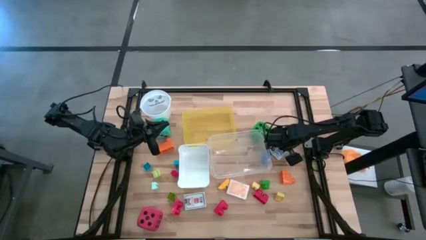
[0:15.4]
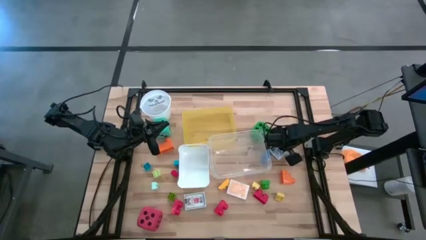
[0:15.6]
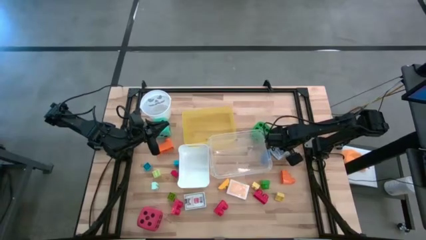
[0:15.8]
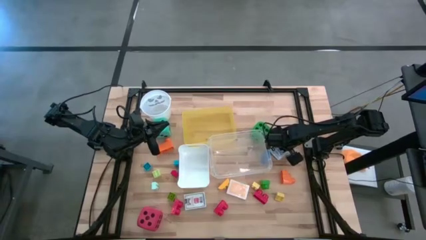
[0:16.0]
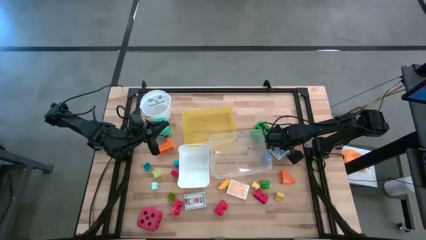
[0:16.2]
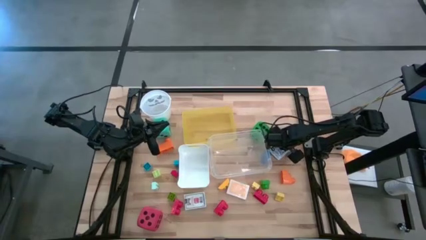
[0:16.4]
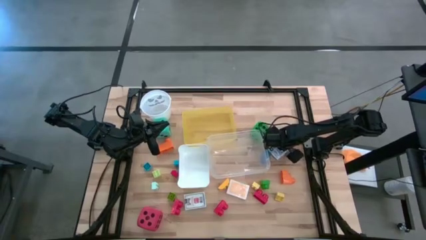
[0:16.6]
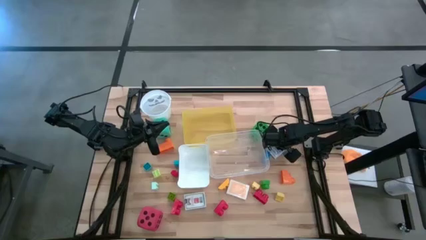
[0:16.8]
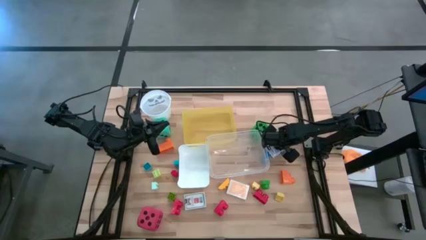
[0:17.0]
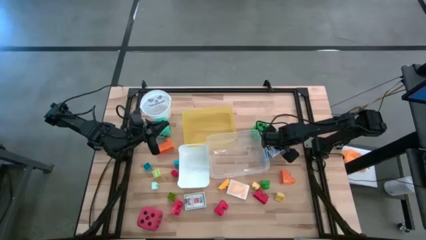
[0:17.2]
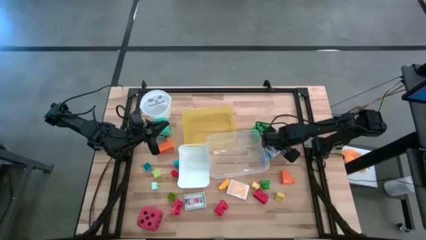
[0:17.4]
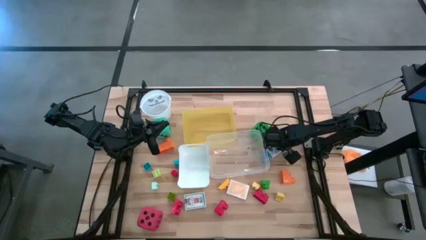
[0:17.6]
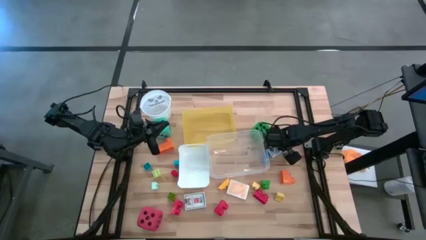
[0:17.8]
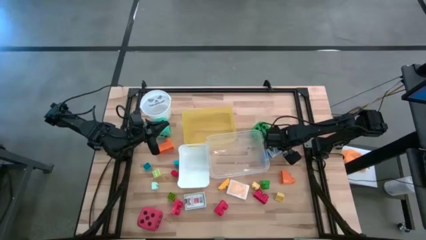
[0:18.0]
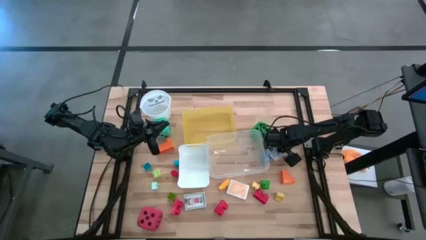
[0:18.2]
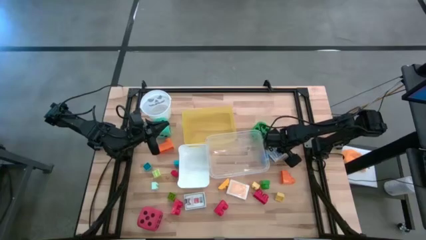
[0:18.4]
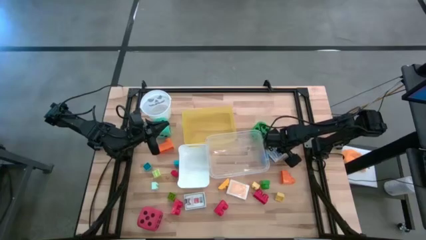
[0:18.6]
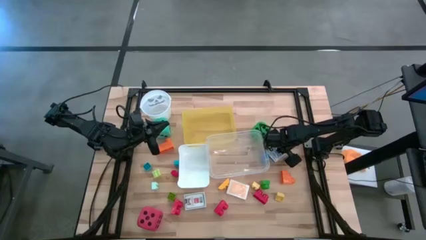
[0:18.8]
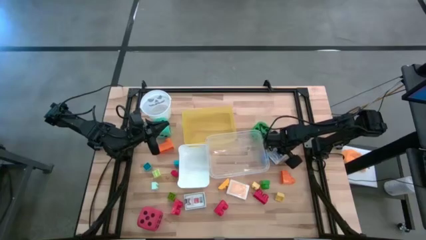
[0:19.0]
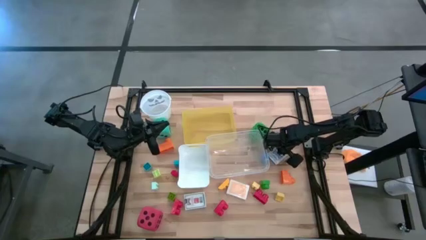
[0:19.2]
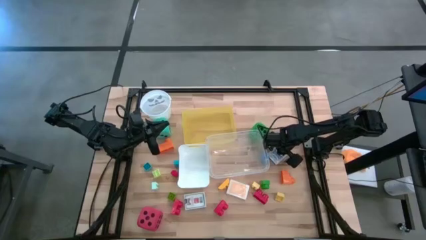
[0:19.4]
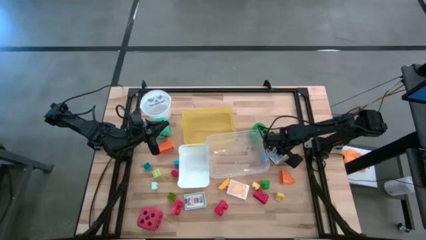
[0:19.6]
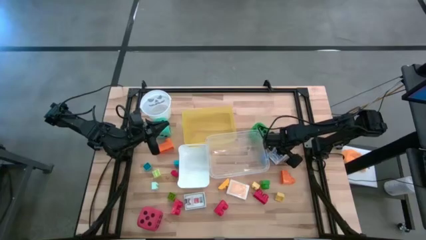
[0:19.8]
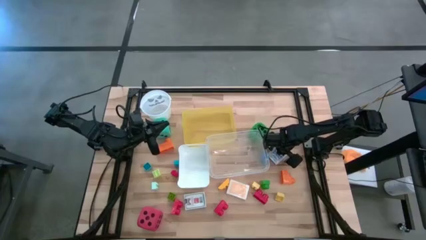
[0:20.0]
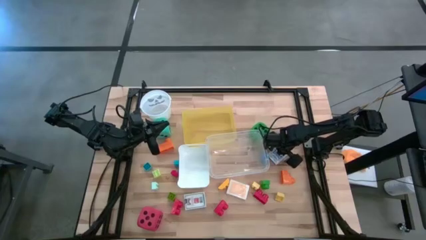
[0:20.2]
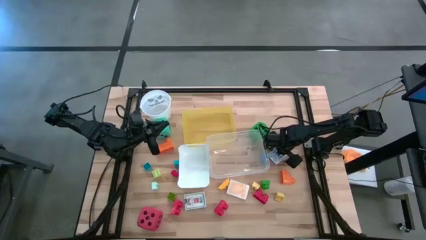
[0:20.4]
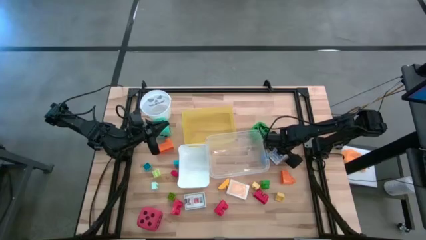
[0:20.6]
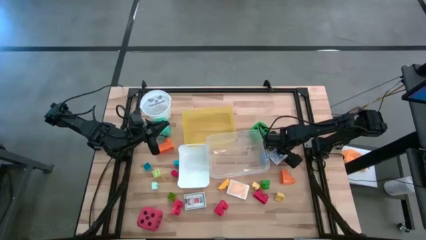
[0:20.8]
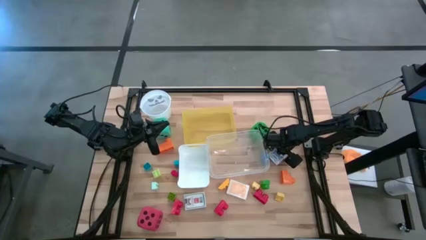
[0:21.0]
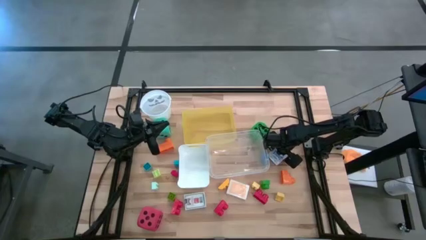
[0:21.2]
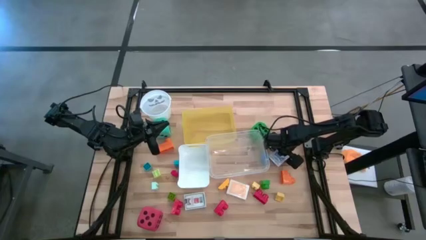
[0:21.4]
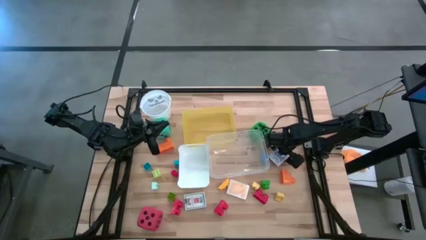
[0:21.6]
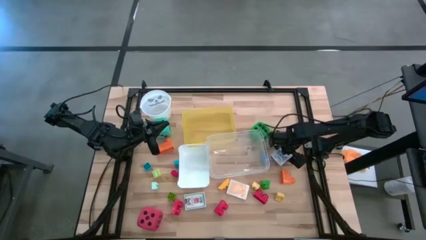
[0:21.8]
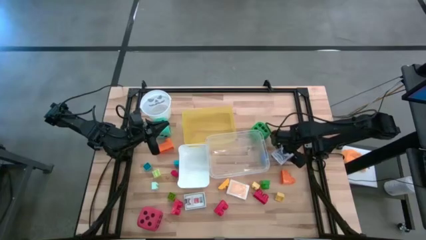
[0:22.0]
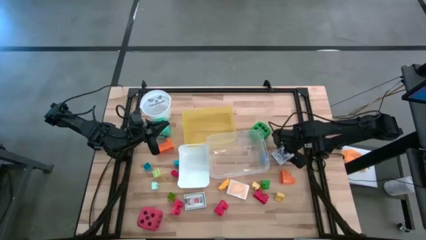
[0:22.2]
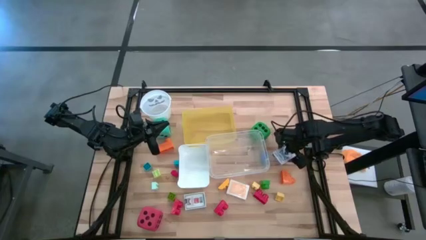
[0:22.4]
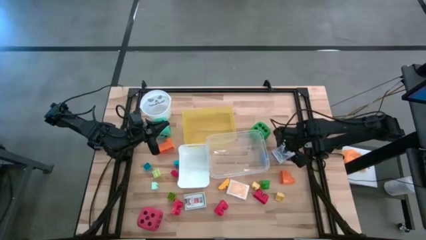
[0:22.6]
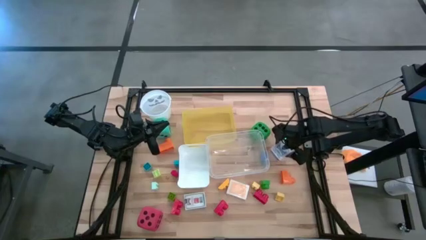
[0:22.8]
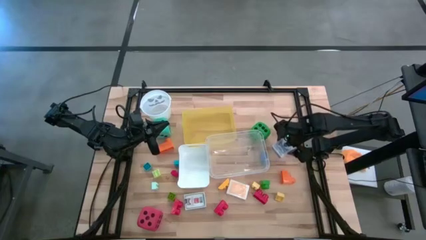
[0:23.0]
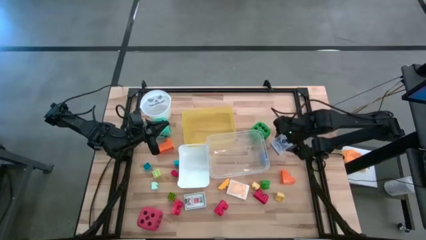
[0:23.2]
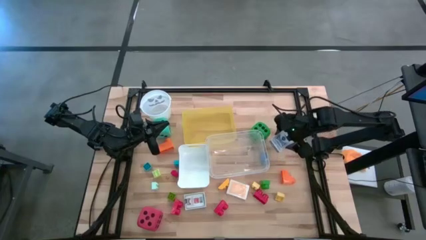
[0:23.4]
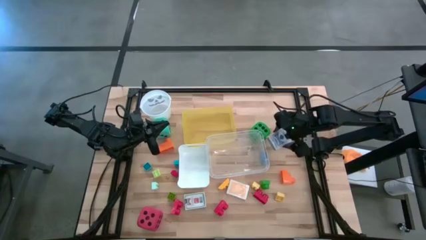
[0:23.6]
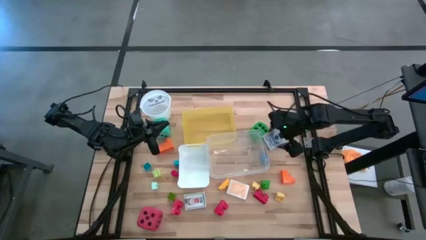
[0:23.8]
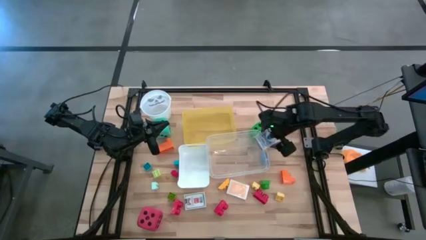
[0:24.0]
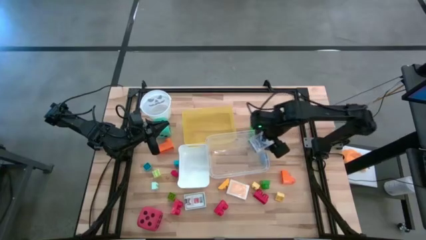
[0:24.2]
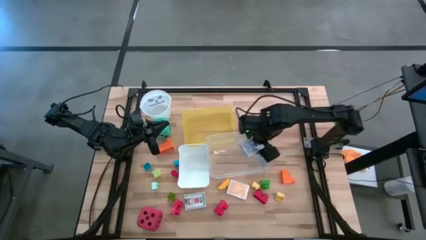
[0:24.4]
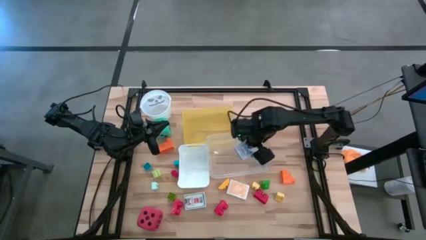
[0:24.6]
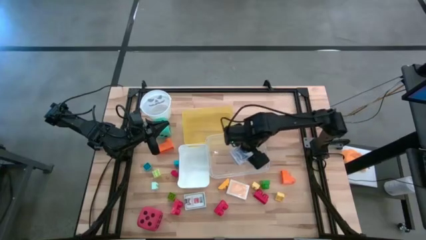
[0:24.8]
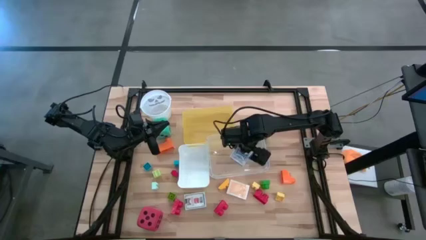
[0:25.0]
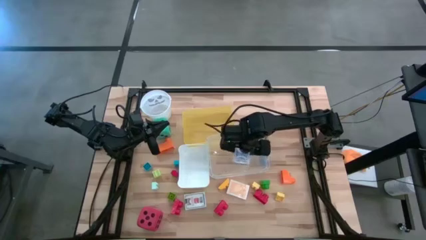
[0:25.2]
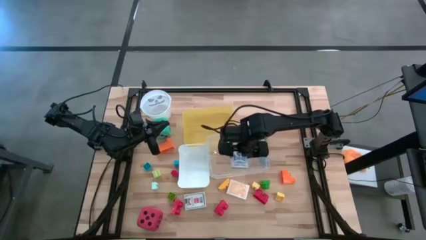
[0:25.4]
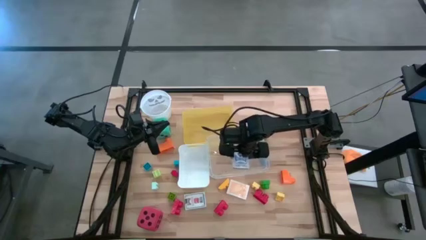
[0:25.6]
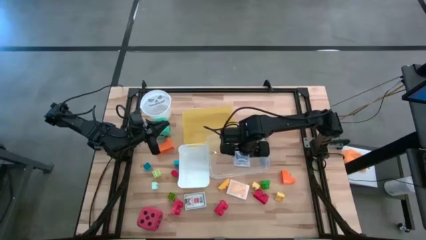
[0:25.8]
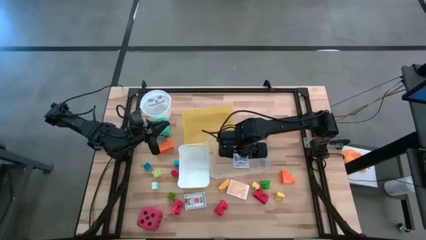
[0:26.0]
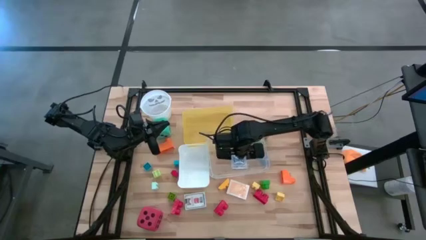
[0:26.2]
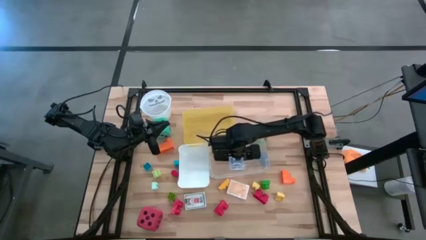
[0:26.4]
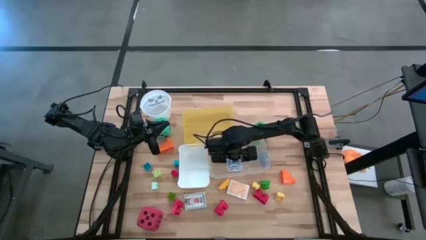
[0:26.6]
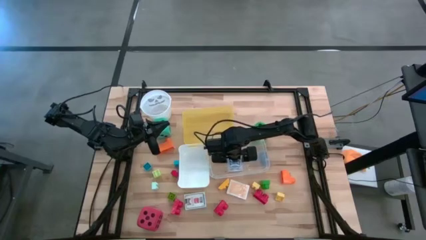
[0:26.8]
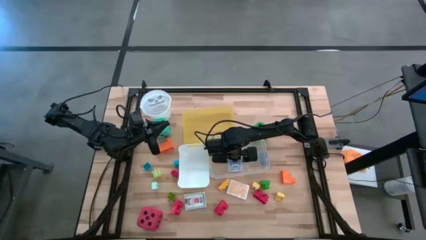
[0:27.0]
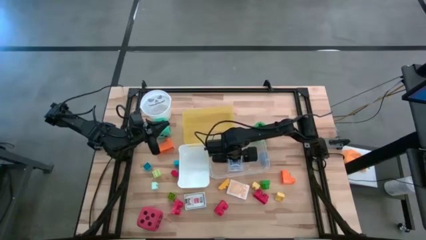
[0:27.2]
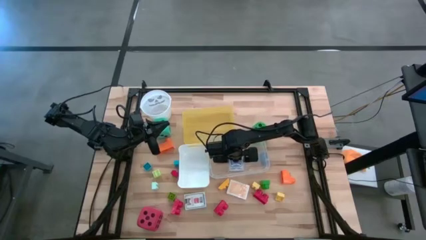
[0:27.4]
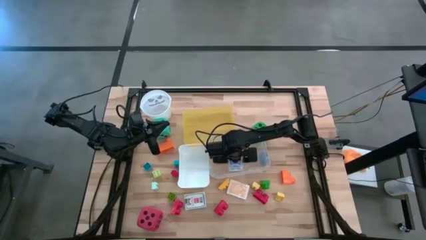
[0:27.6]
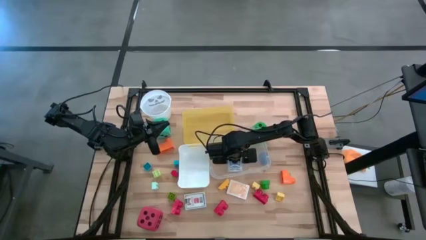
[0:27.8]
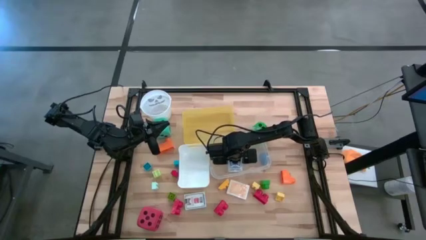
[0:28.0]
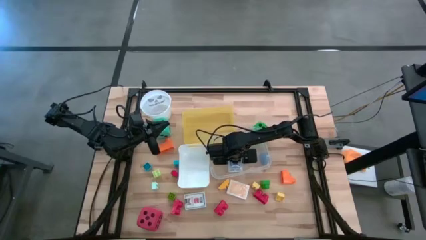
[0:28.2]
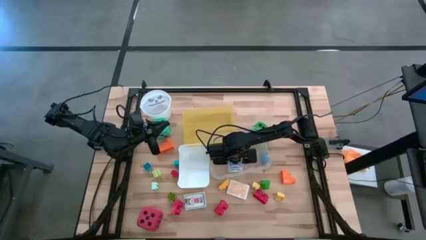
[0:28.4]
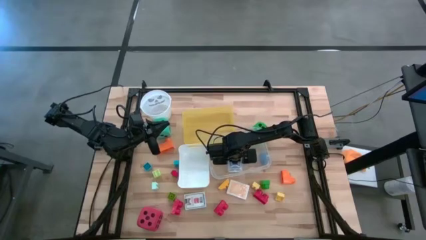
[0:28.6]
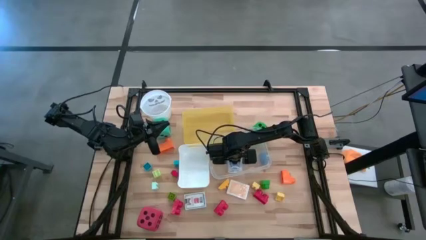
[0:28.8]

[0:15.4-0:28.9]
Task: Pick & Place Toys
Put the blue game card pack into the transparent bin
